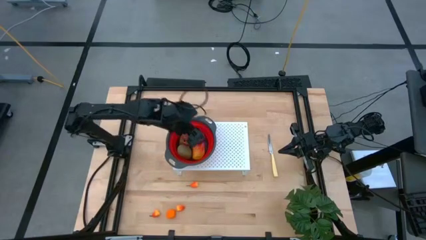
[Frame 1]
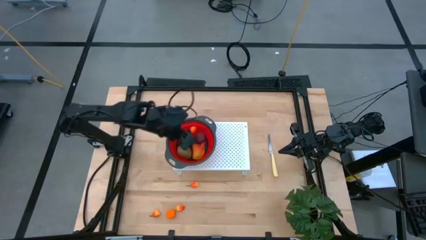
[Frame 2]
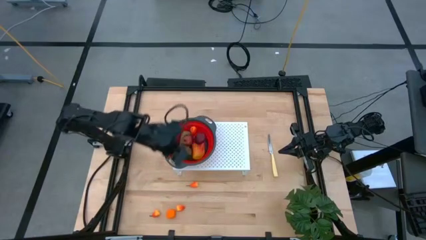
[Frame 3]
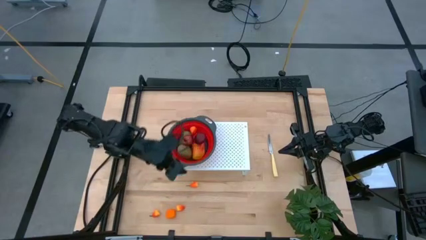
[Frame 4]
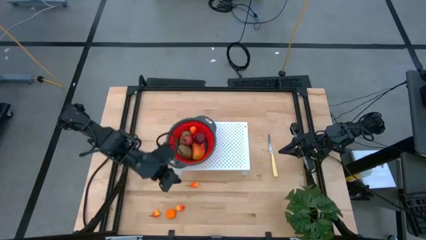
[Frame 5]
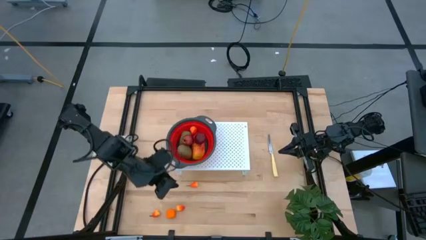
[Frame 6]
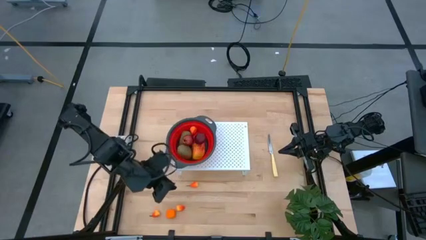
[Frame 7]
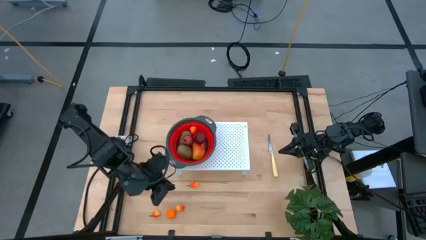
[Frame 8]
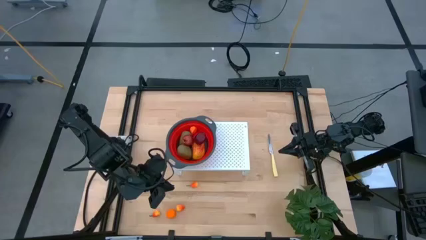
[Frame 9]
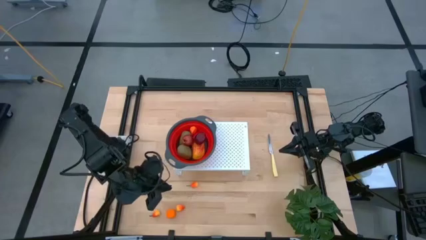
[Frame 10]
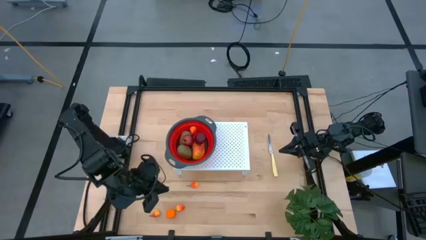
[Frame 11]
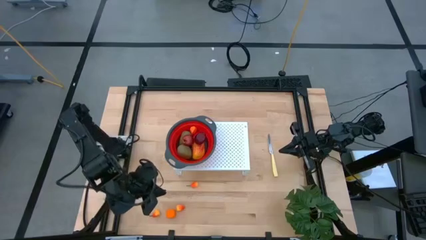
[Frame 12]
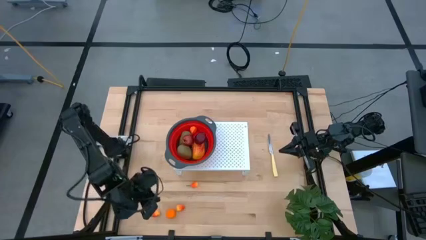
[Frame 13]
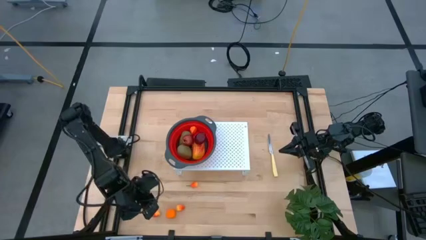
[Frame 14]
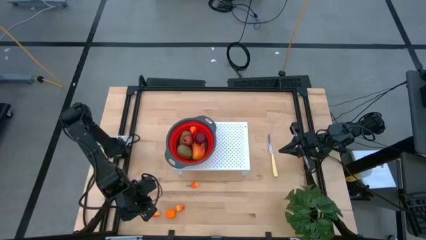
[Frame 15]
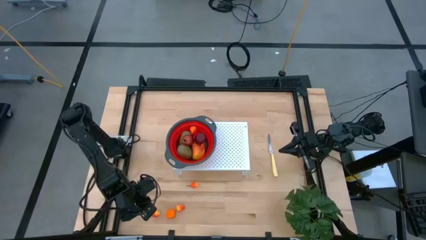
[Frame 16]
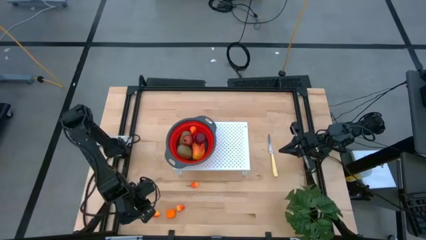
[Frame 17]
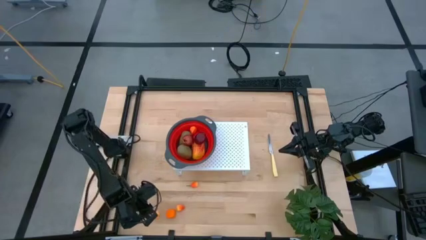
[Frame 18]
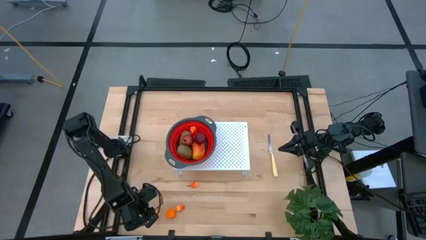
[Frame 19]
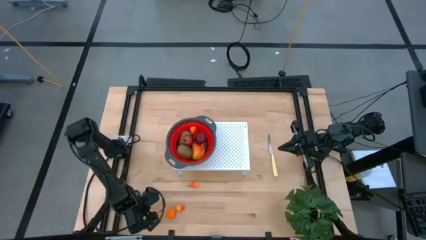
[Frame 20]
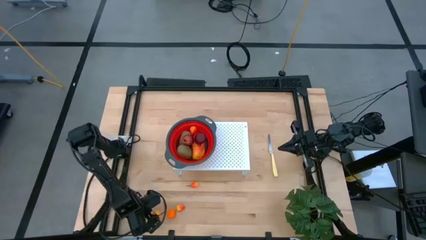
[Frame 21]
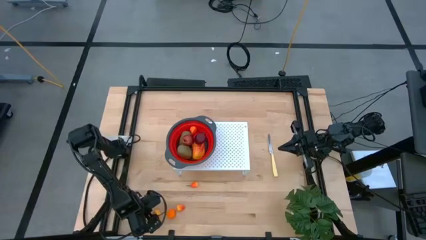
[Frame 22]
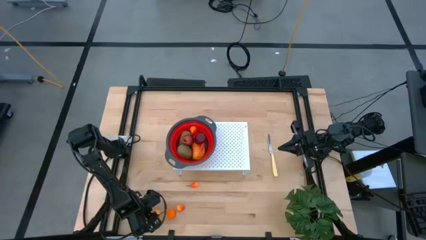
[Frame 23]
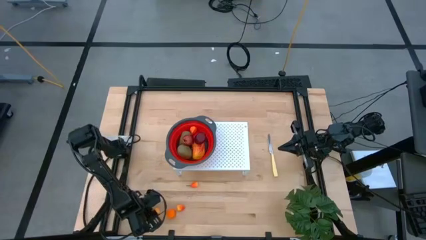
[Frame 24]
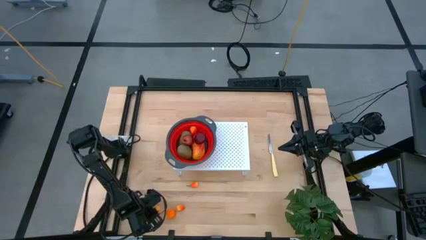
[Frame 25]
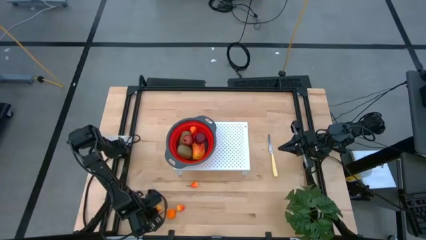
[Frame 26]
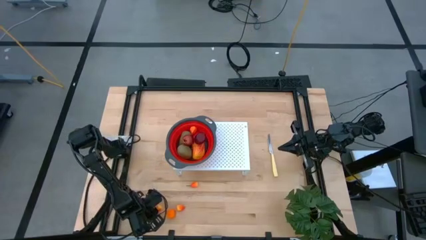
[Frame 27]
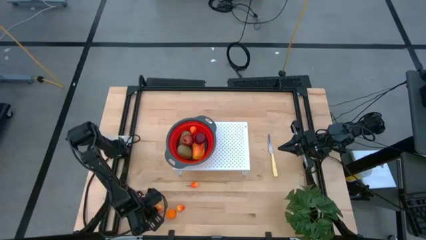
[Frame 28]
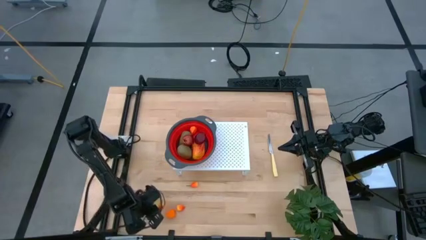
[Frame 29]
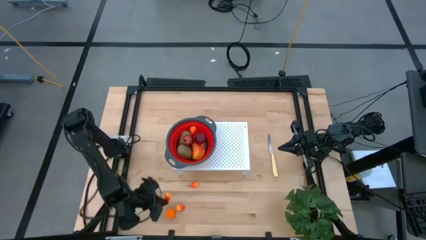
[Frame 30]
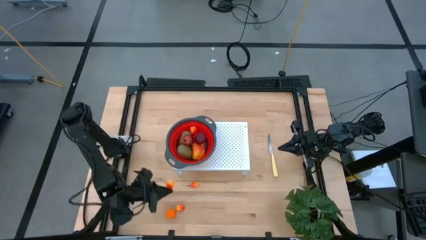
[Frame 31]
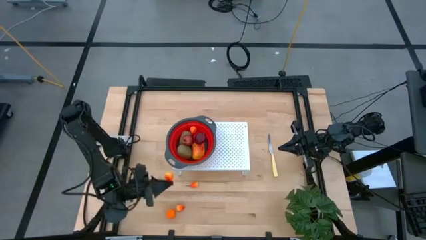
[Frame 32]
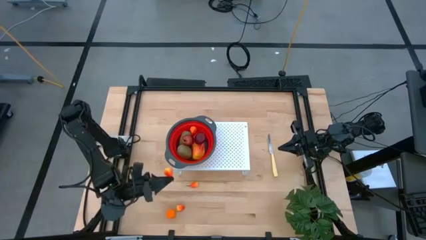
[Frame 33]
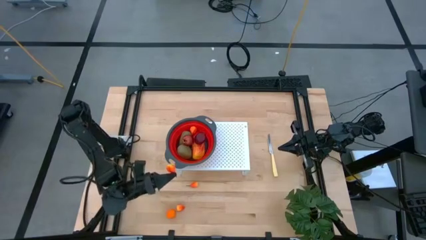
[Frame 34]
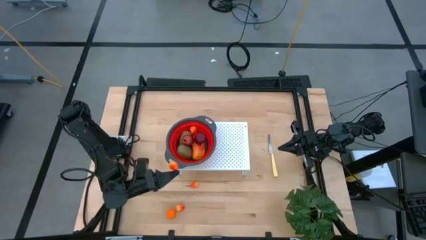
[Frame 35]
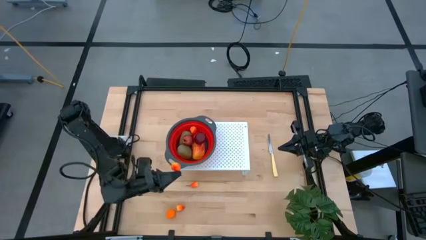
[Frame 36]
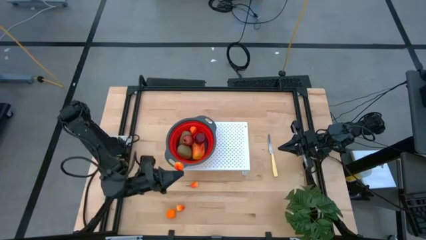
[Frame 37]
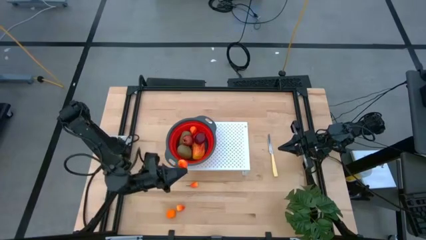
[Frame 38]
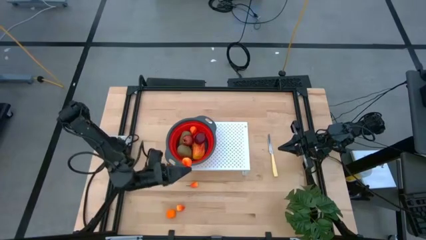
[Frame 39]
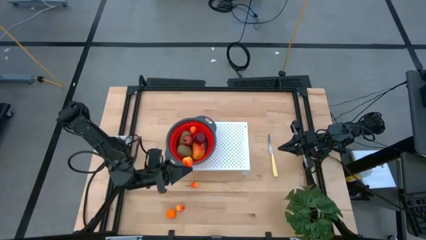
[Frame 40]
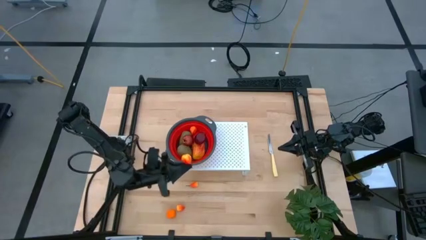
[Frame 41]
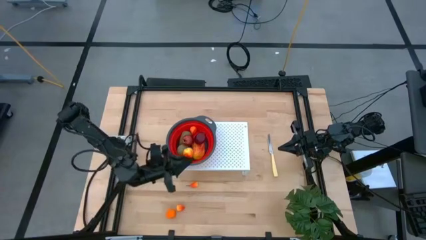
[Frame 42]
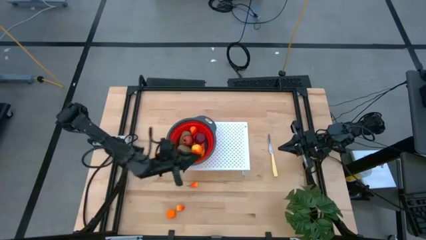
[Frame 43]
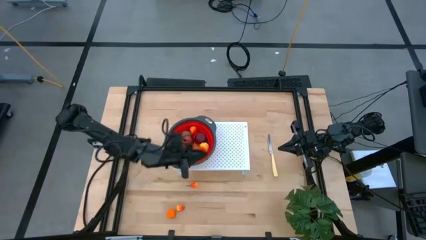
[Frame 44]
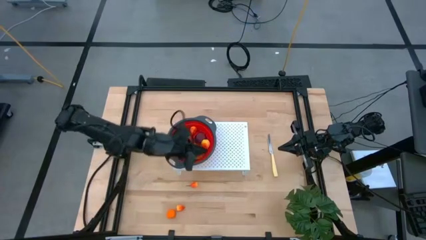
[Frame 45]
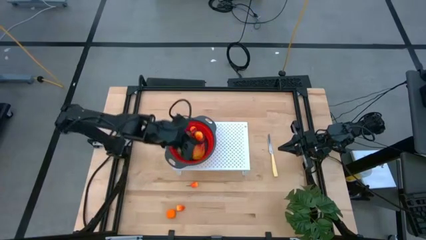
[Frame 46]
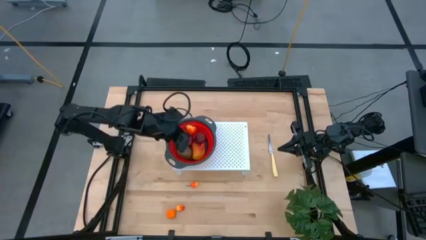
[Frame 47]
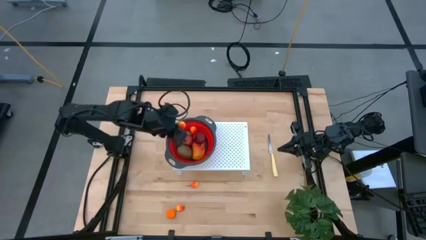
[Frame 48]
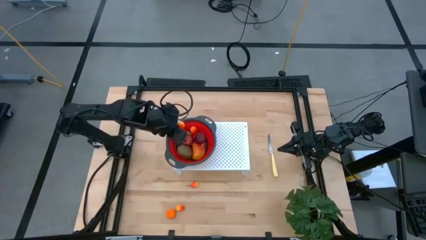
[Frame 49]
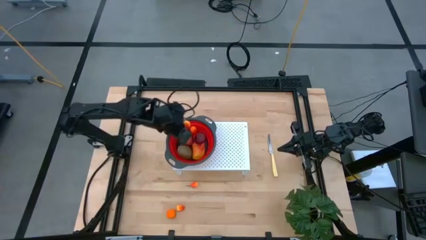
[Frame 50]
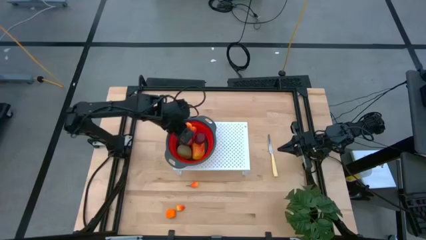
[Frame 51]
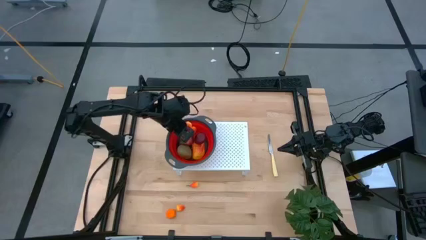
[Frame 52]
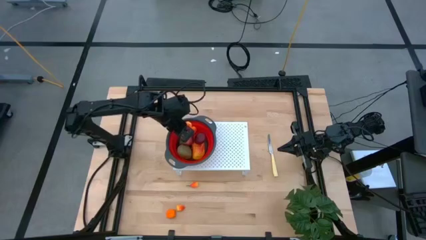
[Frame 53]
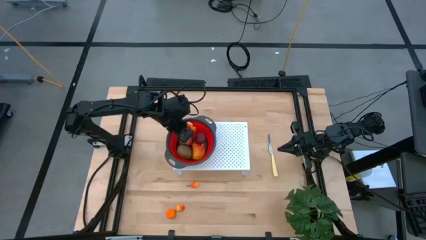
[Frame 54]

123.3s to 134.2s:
Task: Pick & Place Fruit
Put the orange pear into the red strainer bowl on the shelf
